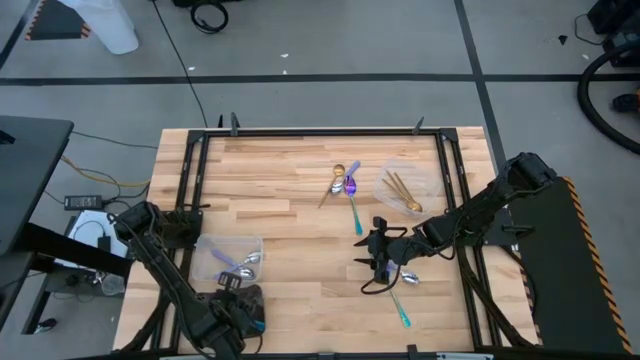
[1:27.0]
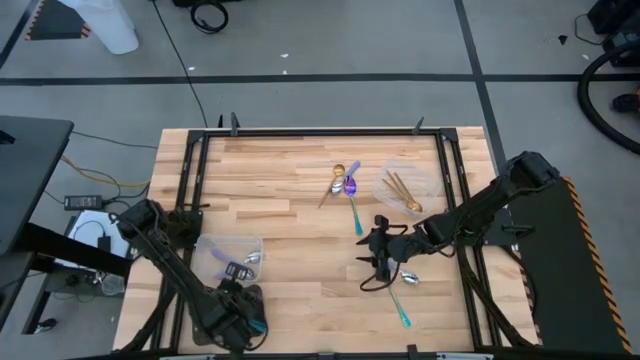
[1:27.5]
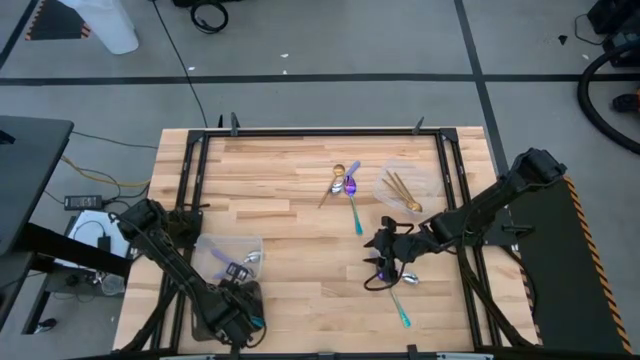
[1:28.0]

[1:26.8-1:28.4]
Task: Sort silverware by color (type)
Adjust the black bin

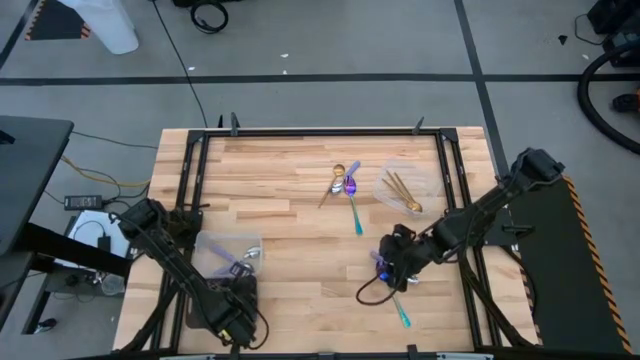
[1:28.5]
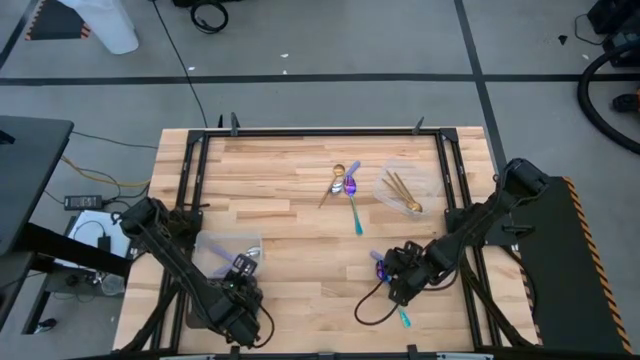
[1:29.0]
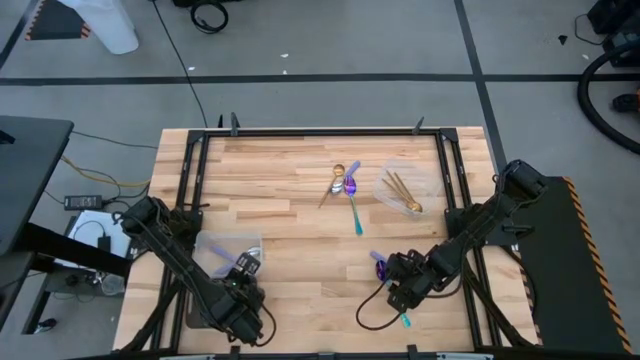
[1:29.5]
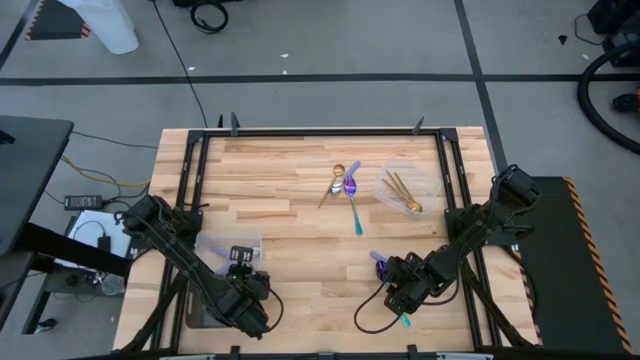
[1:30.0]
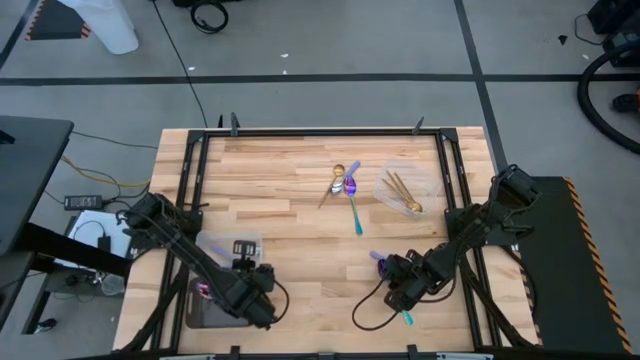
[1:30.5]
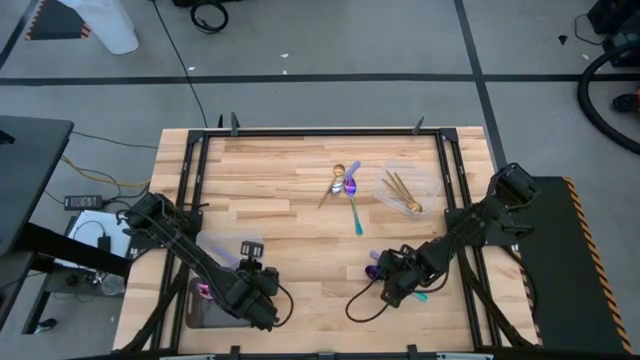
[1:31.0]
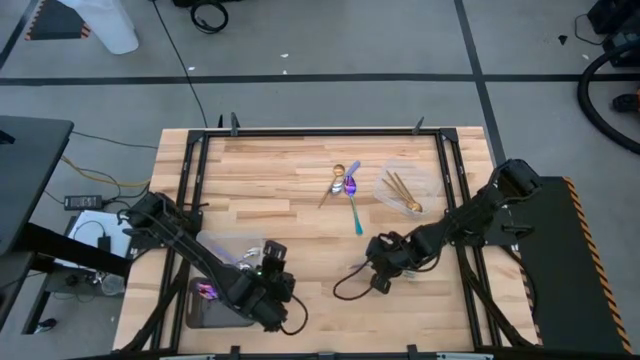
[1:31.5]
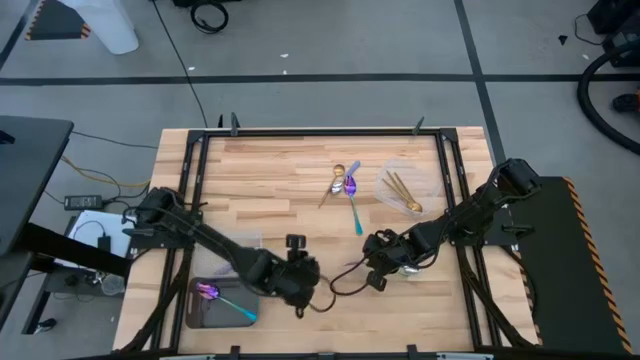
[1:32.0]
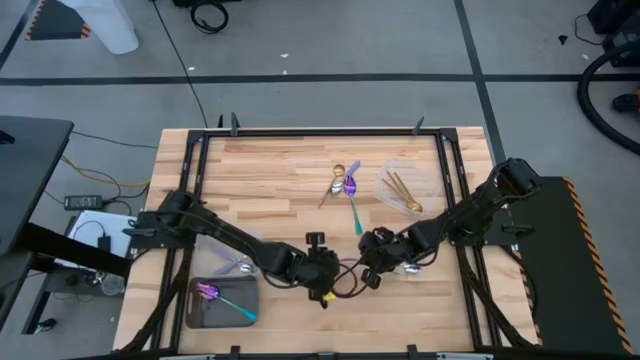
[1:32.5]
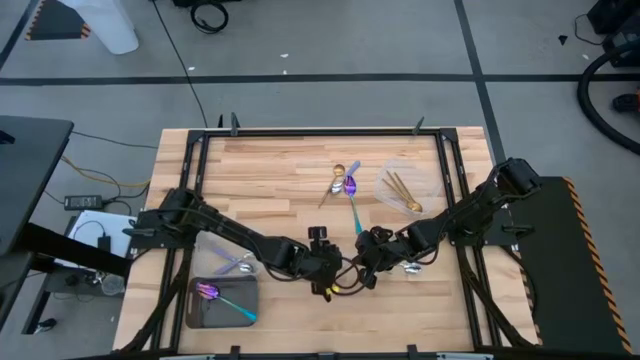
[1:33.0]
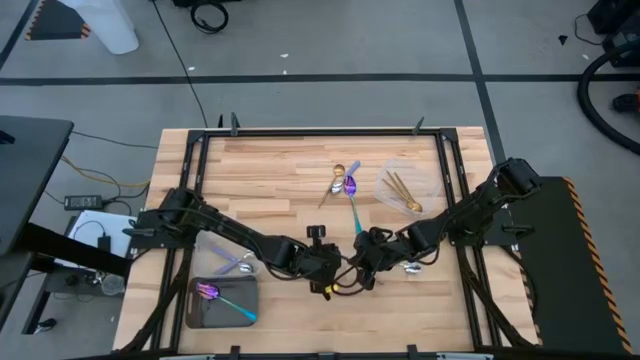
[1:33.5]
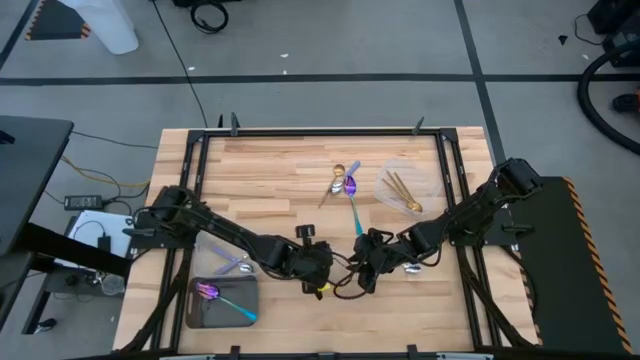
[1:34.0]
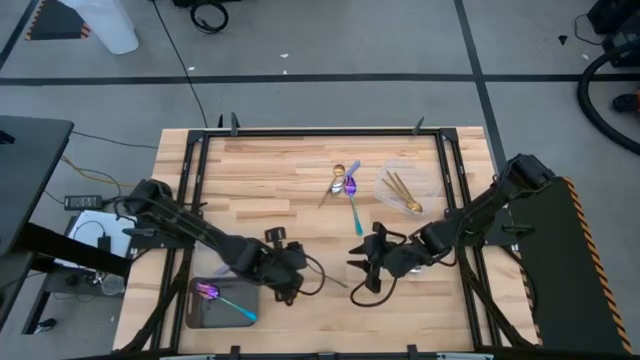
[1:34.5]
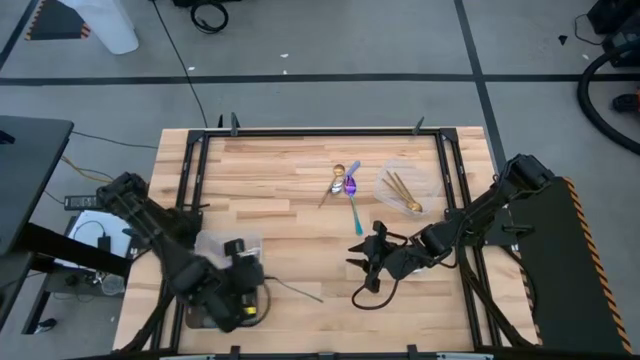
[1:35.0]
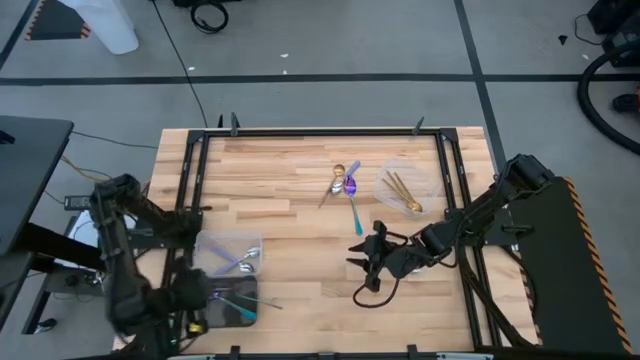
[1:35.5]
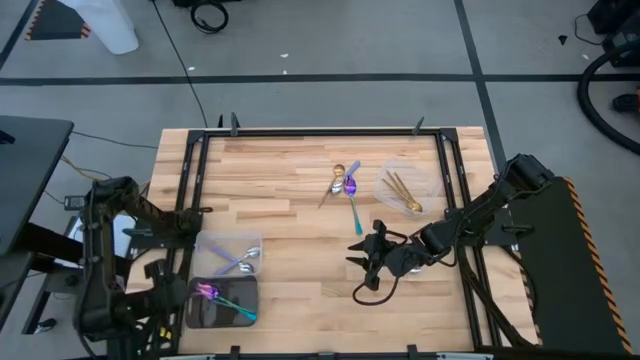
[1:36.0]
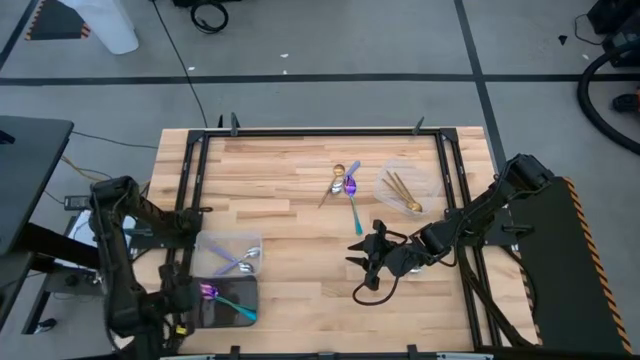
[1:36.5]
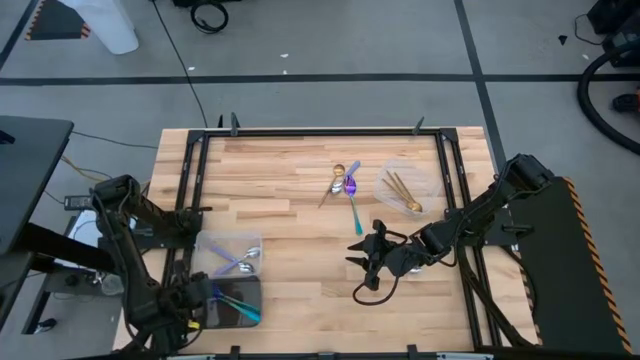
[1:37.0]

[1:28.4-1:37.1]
Put the blue spoon into the black bin

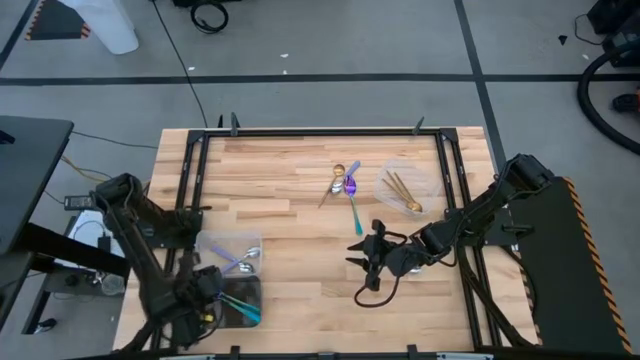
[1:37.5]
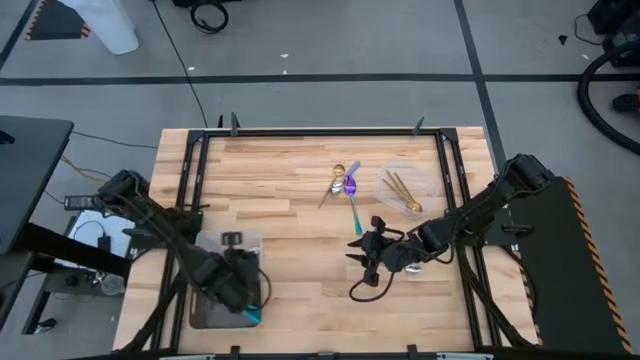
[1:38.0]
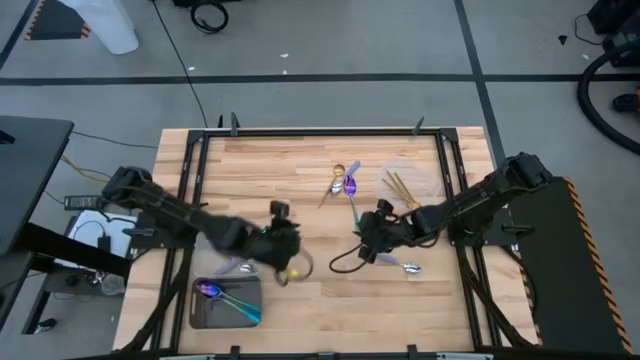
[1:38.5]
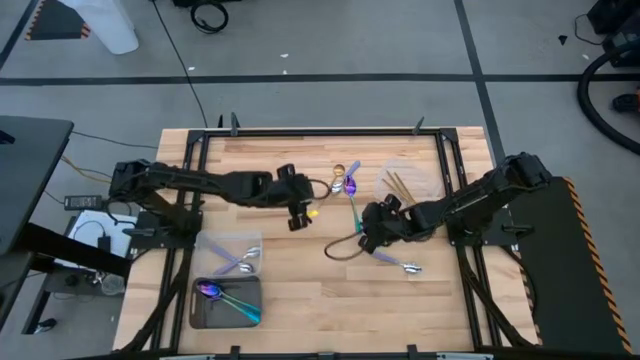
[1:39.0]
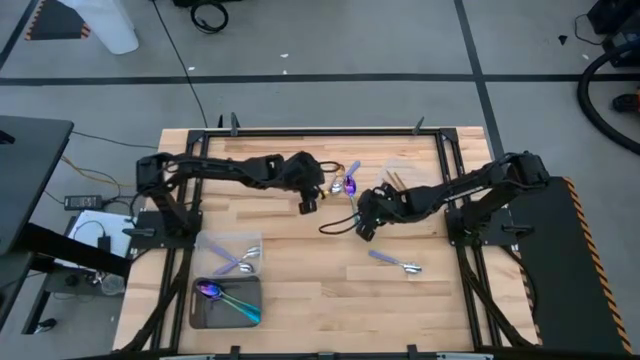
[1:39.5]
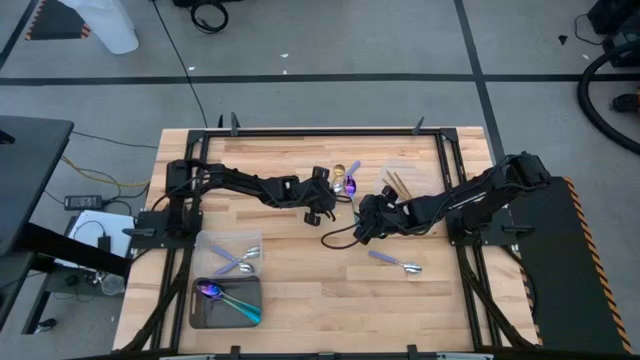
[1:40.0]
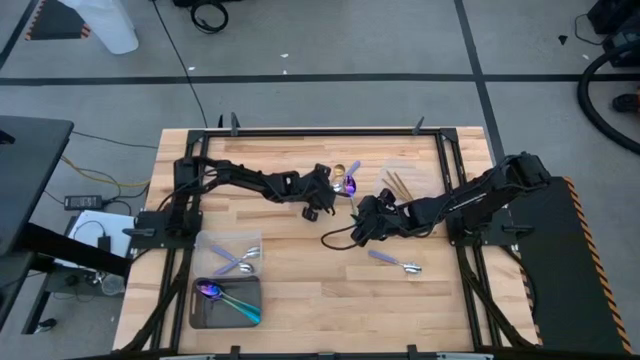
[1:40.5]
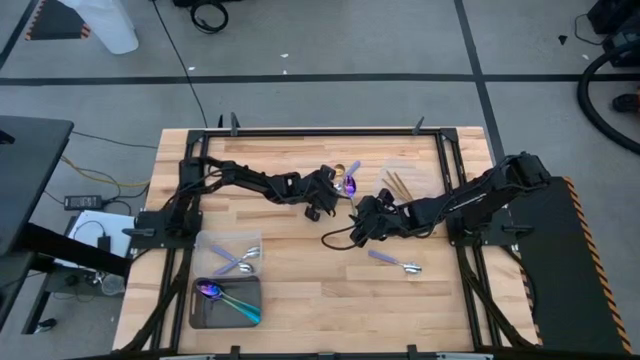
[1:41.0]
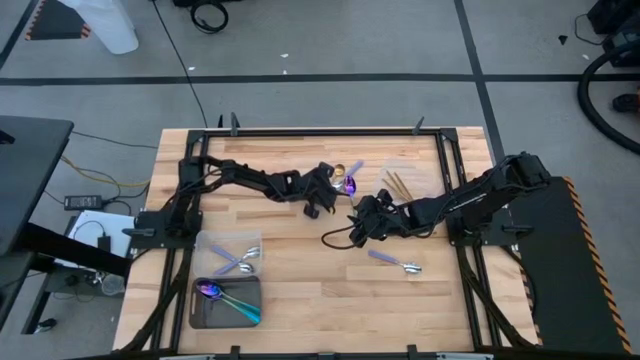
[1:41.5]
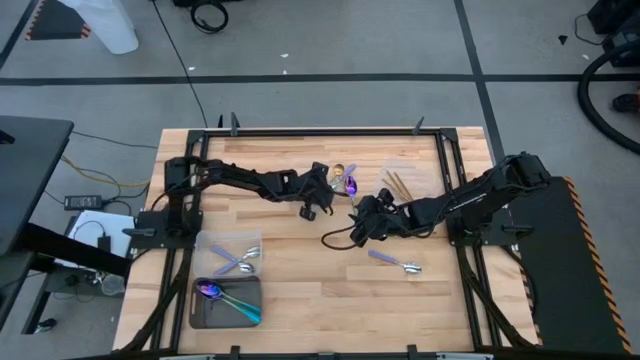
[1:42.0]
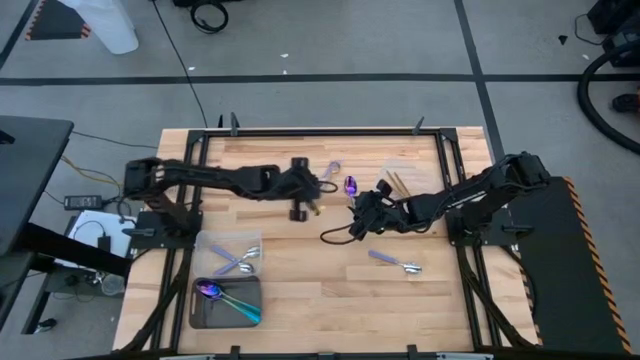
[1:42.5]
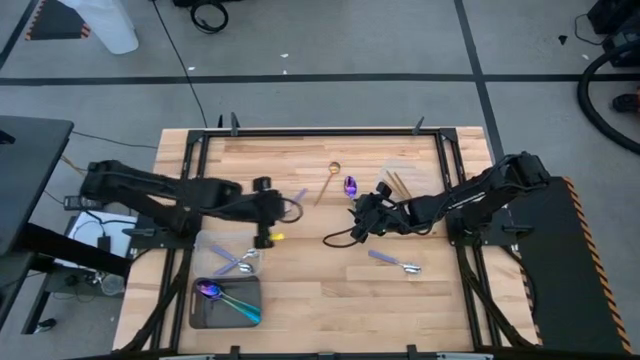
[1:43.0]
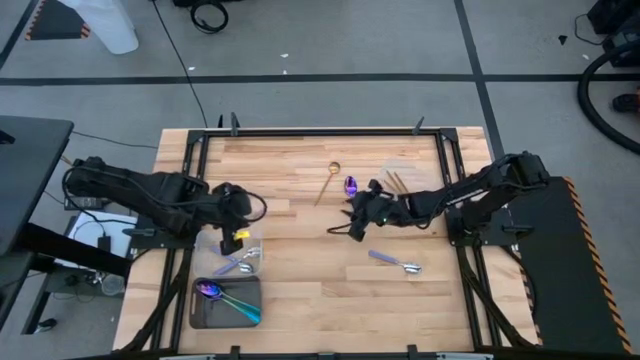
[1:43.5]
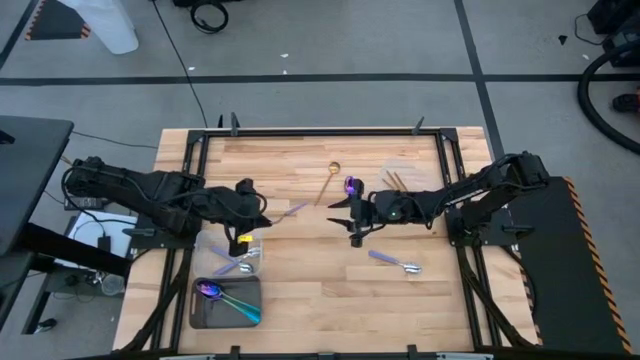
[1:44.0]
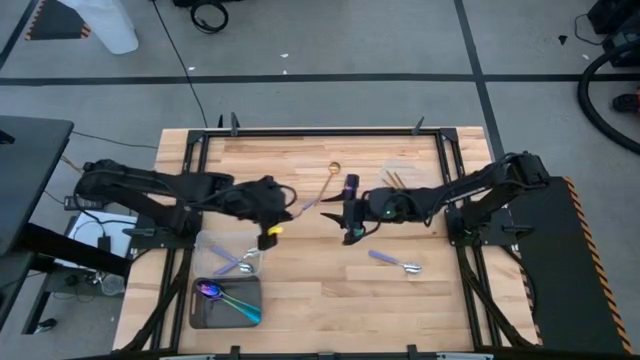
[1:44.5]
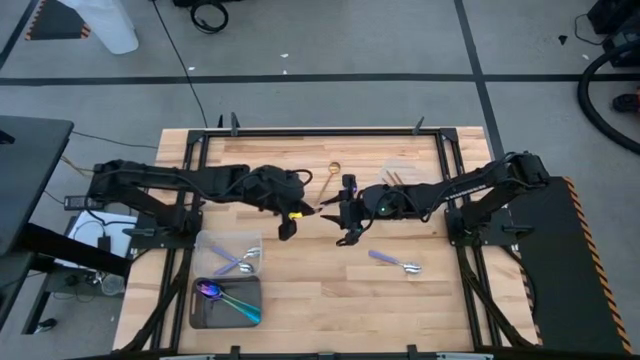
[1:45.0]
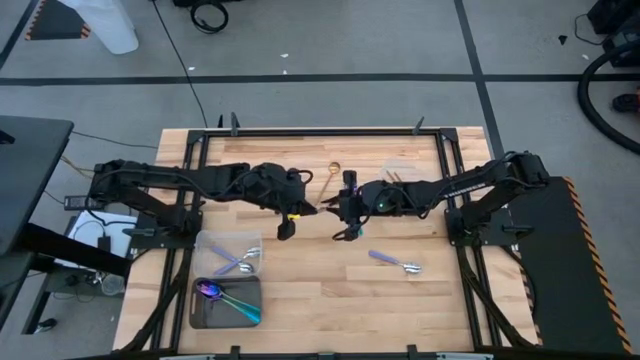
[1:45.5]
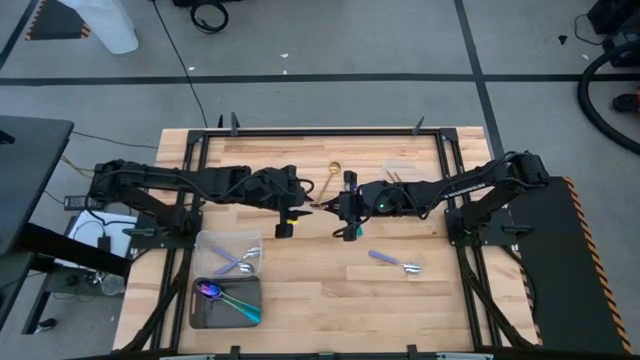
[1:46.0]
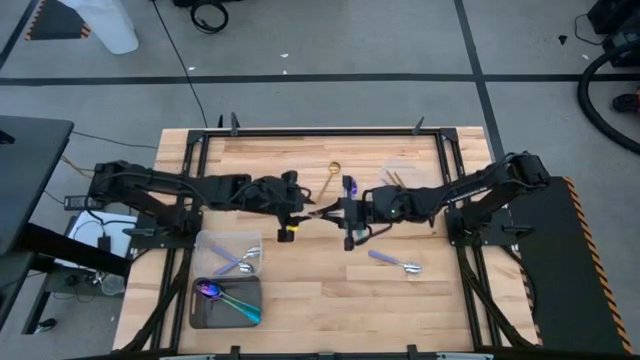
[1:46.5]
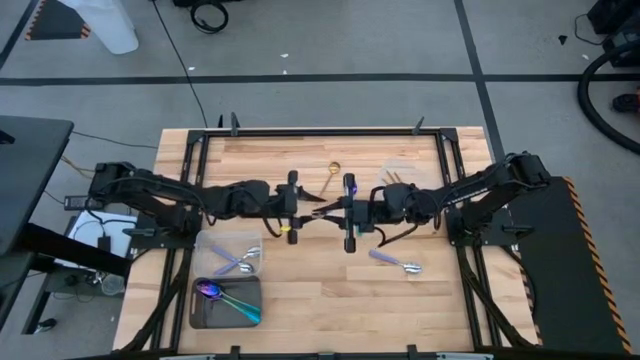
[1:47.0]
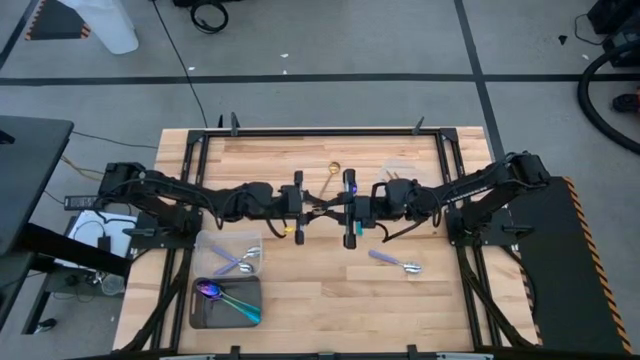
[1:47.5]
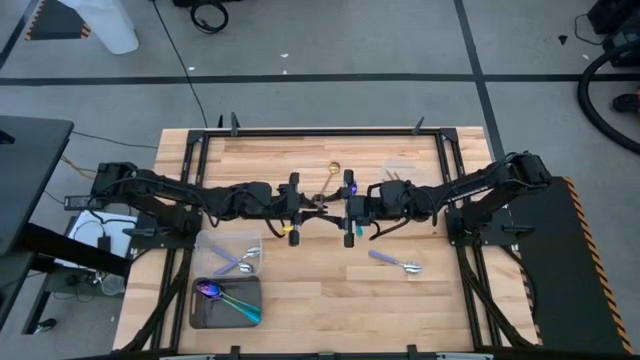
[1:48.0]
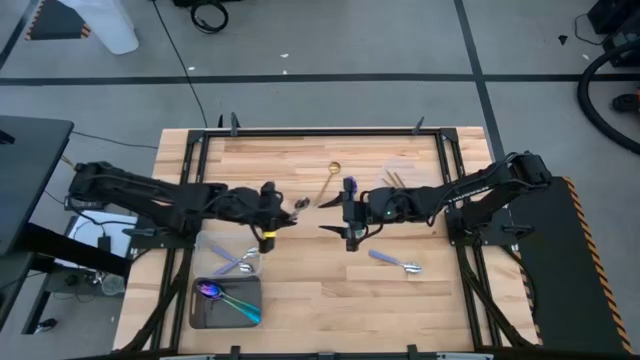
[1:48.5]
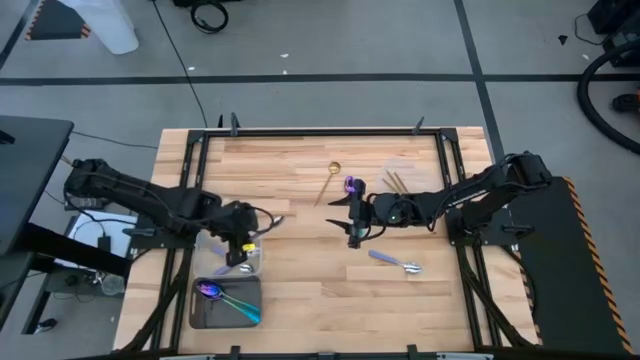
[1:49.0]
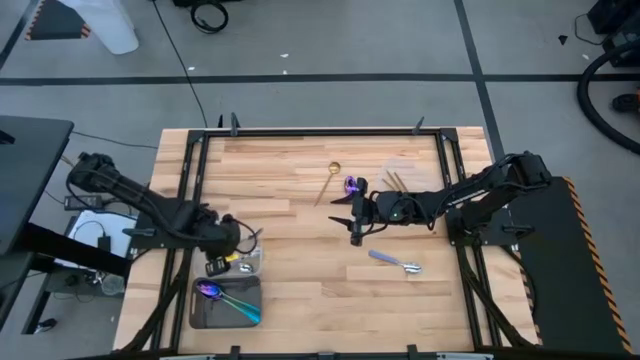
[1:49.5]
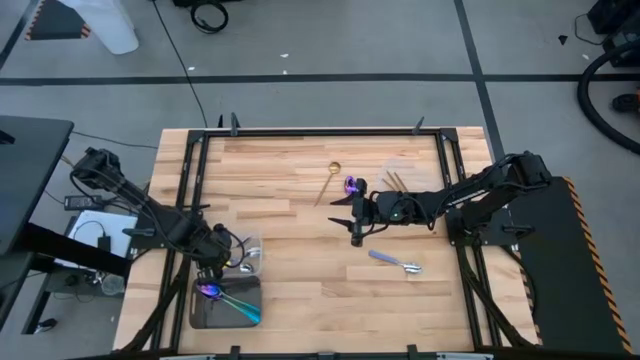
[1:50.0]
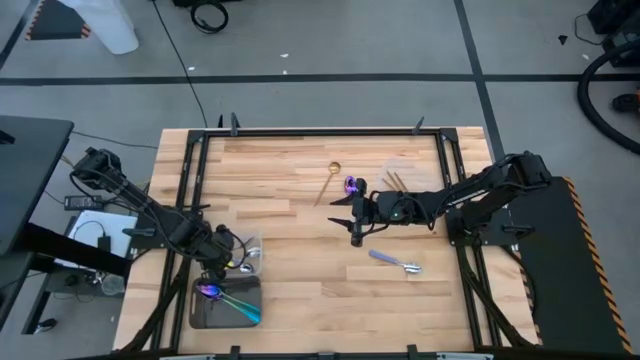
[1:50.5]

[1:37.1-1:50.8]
Put the purple spoon into the bottom transparent bin
